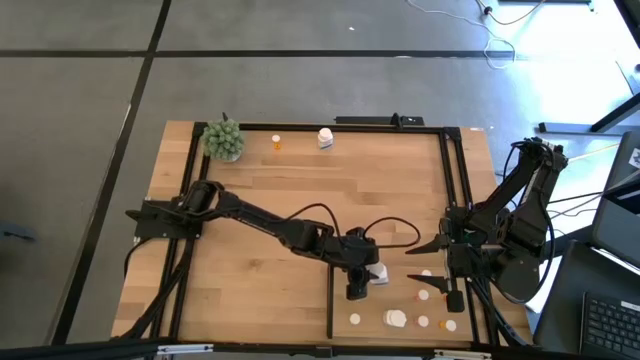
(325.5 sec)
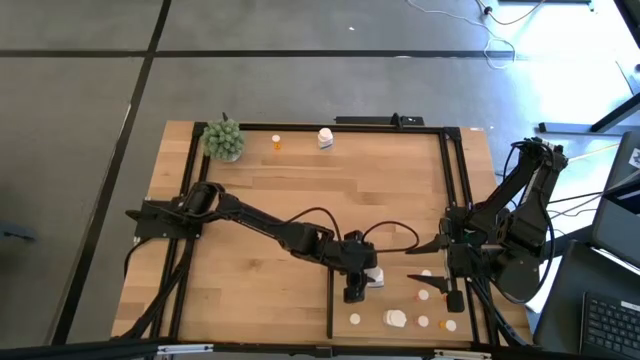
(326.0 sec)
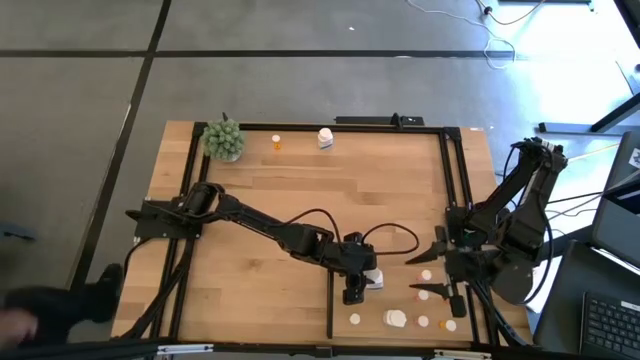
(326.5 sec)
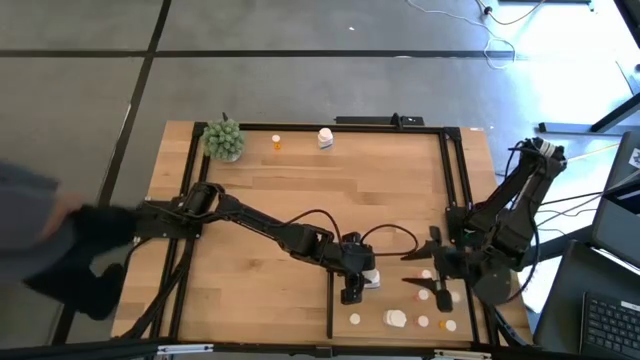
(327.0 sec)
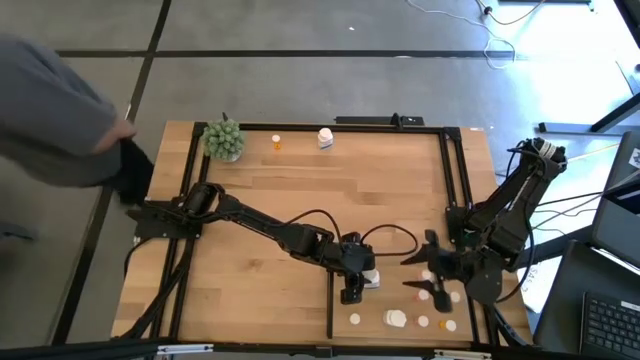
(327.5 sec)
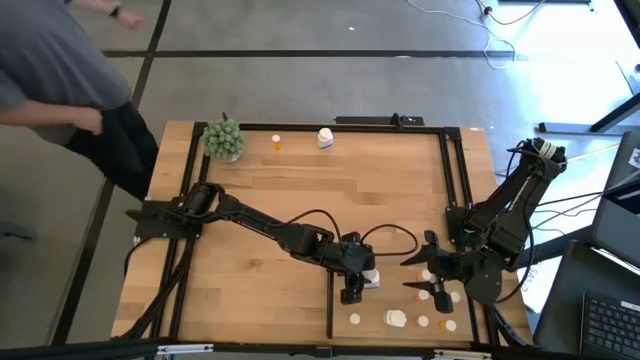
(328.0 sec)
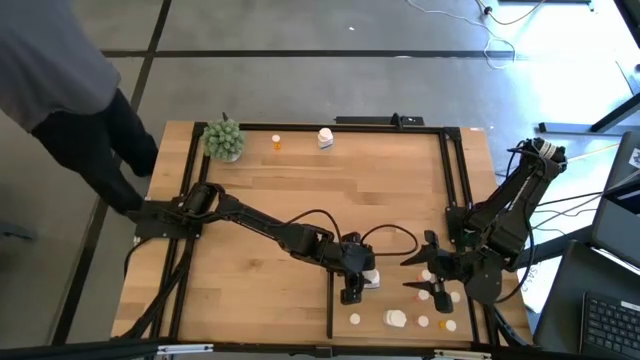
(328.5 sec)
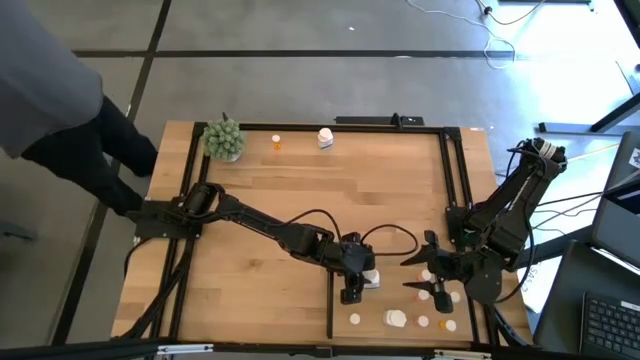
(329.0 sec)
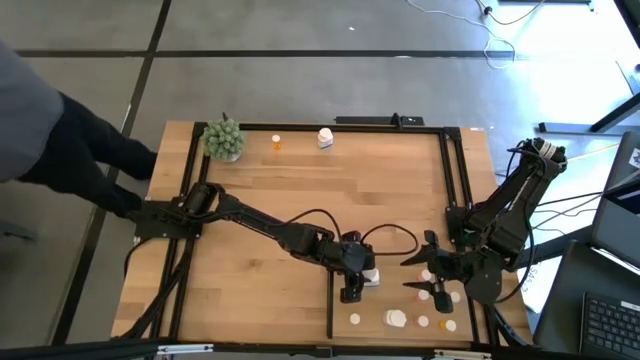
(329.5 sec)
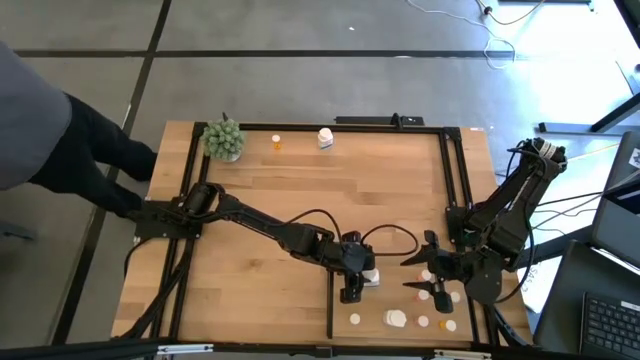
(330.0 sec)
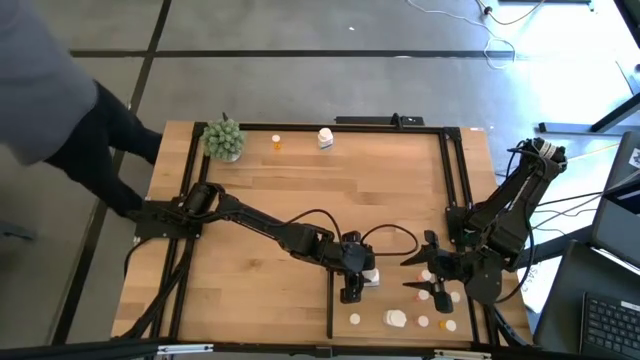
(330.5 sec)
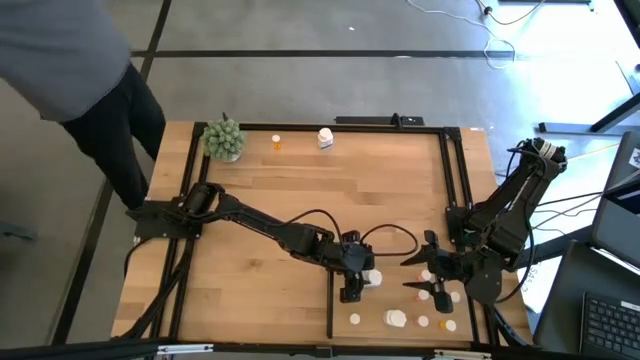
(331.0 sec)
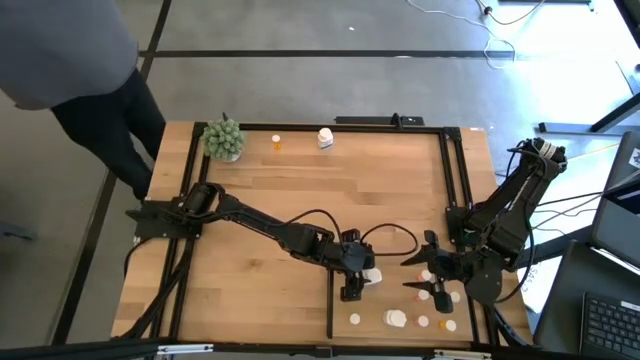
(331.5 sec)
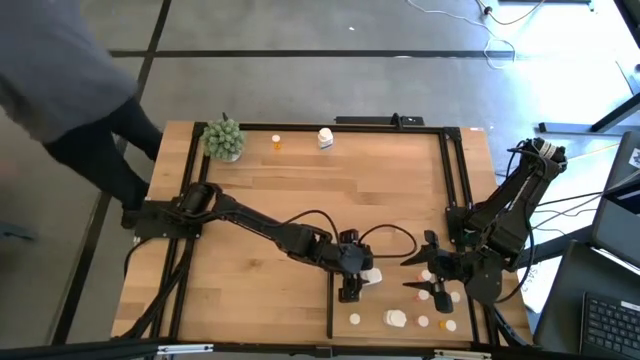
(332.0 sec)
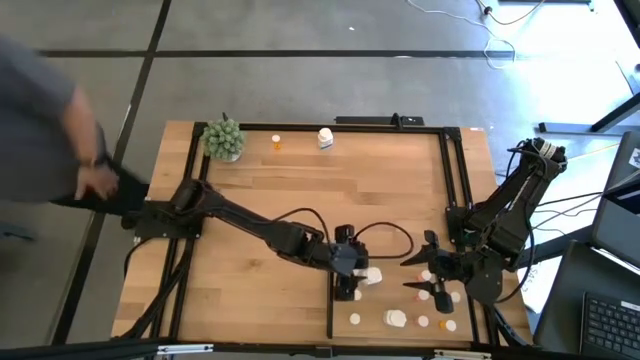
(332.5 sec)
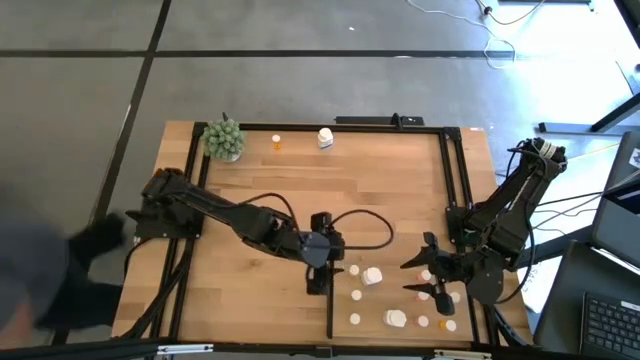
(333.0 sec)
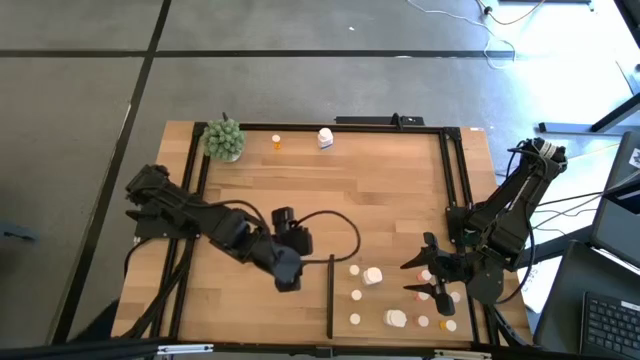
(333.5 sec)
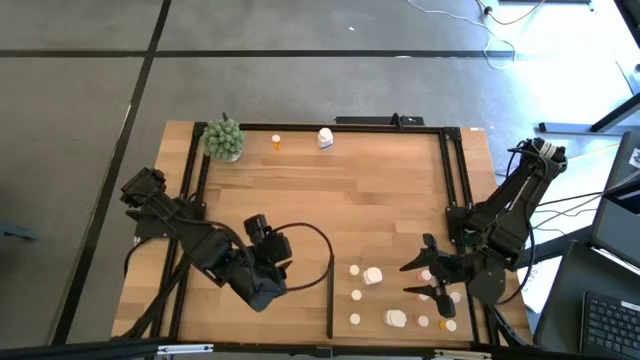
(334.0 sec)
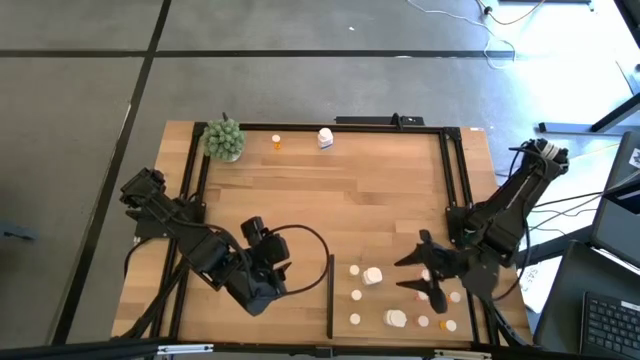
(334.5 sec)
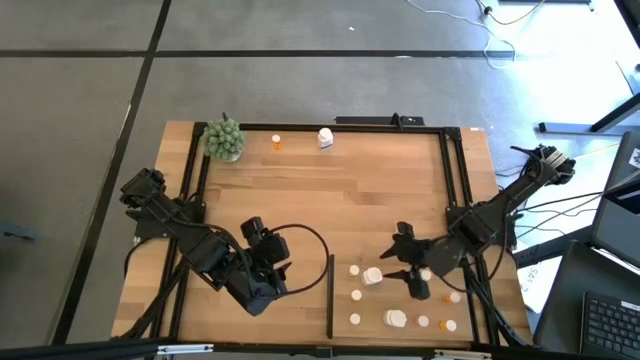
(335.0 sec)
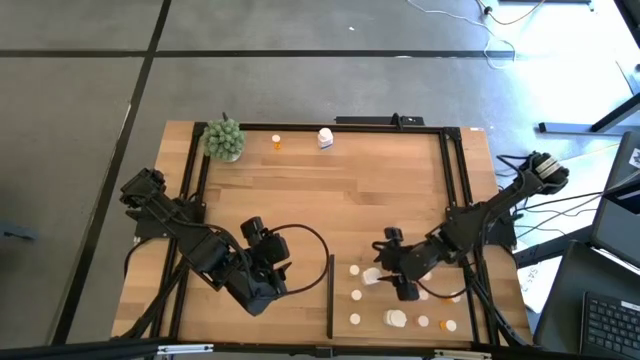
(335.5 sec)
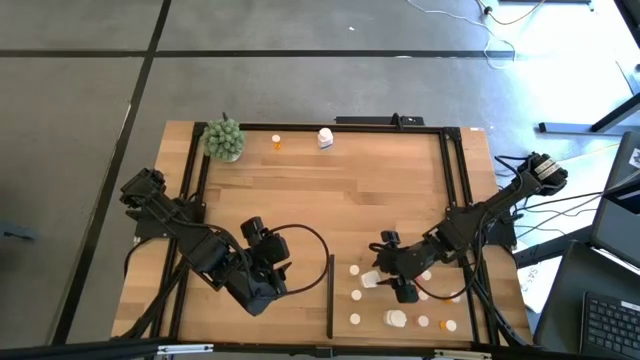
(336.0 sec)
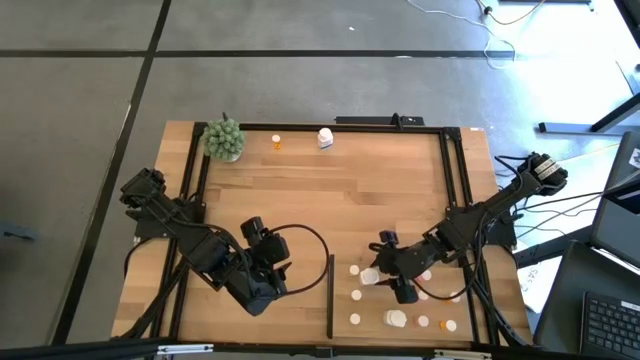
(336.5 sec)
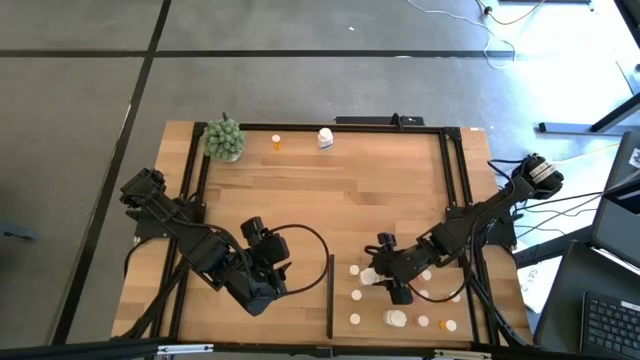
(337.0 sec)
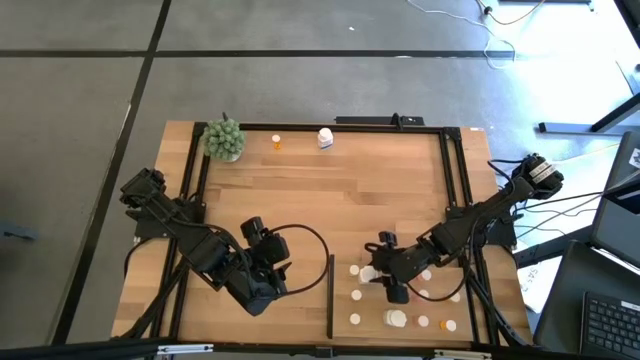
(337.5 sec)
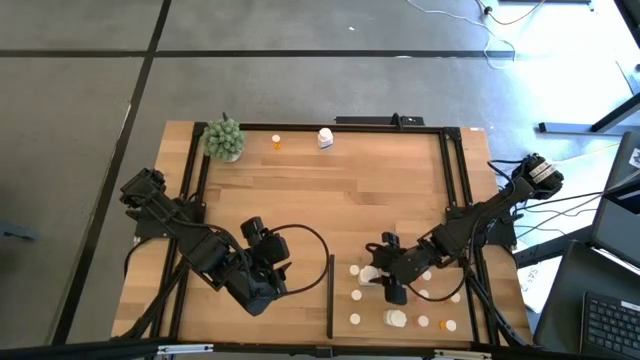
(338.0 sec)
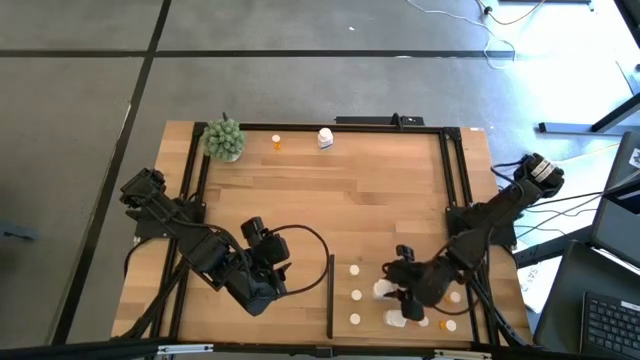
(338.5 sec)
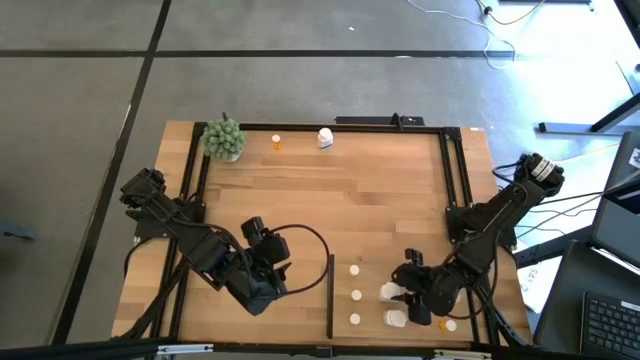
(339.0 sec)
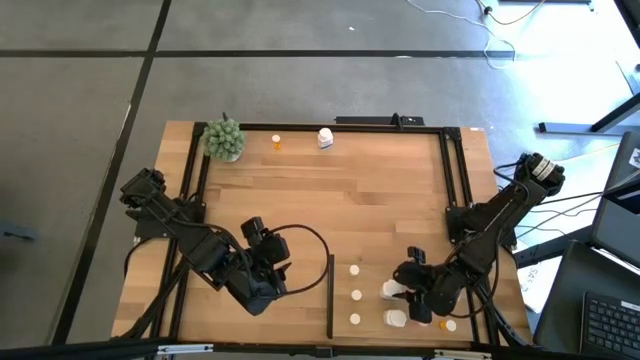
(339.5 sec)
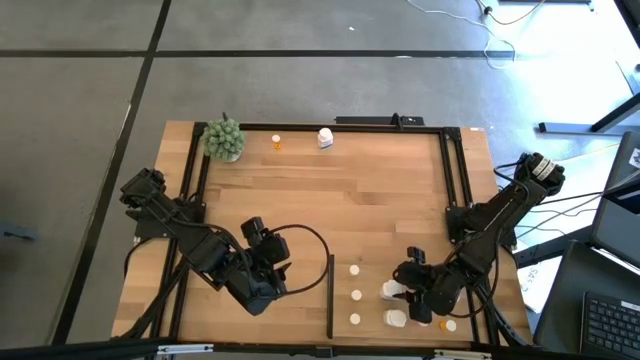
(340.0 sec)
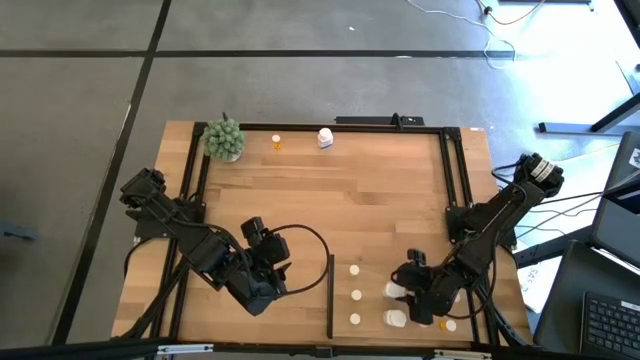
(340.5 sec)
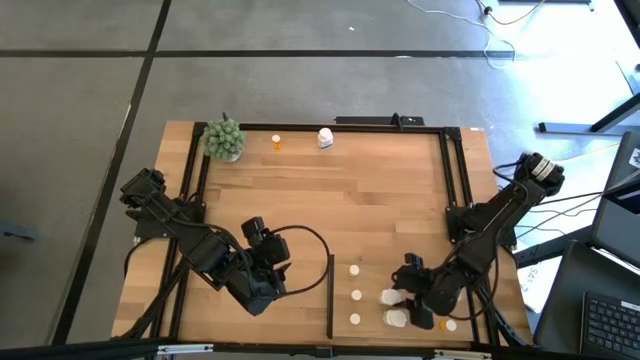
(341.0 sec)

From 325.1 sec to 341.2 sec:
Task: Pick and place medicine bottles onto shelf by color
Put the bottom supplement bottle on the shelf aligned with the other supplement bottle

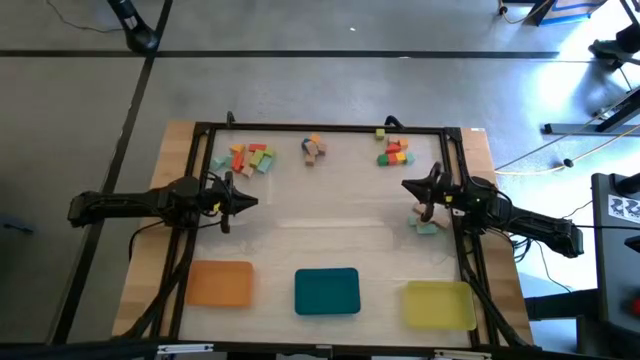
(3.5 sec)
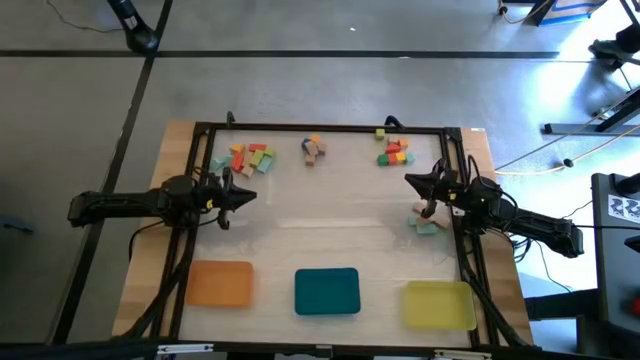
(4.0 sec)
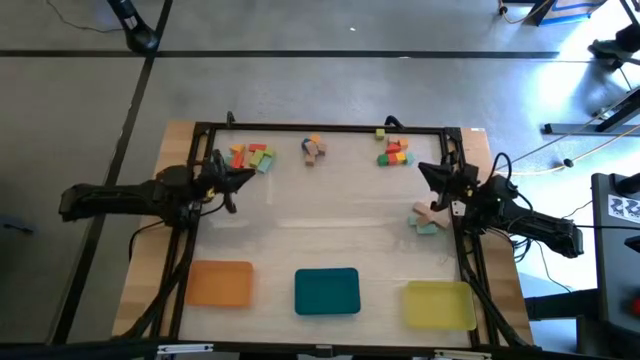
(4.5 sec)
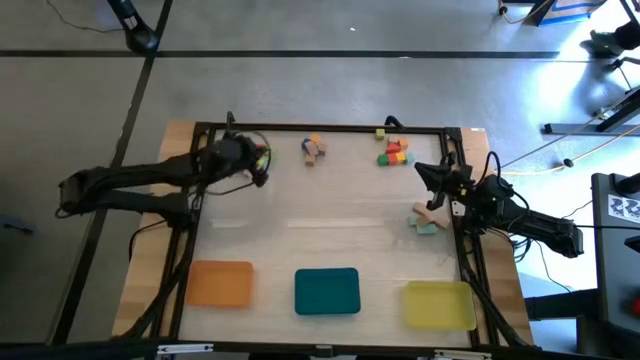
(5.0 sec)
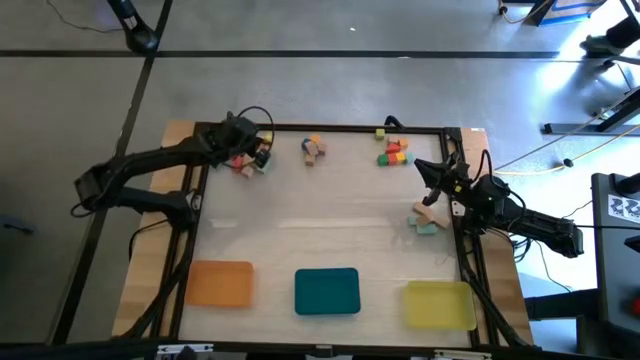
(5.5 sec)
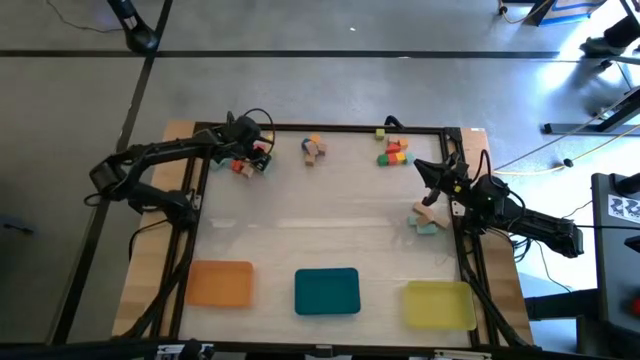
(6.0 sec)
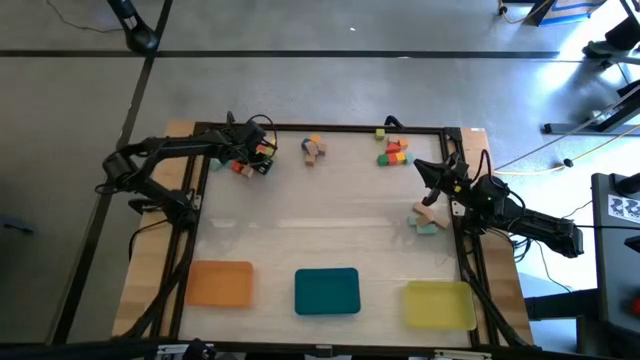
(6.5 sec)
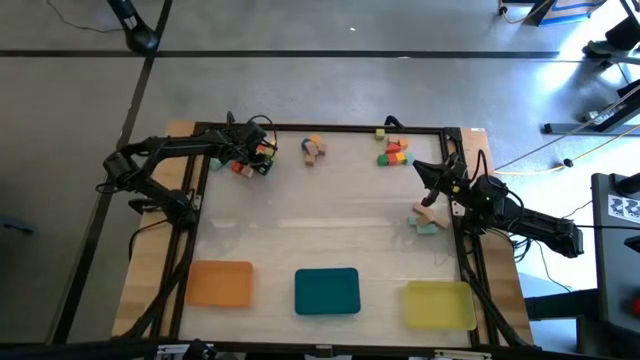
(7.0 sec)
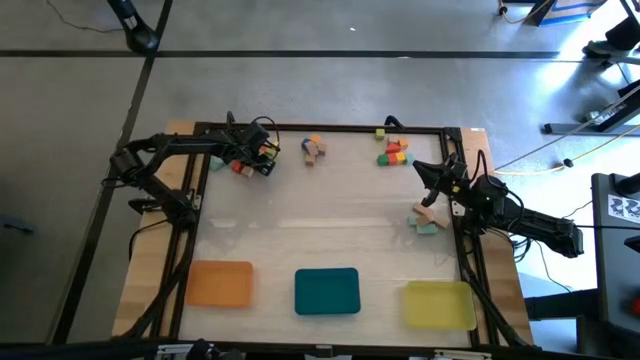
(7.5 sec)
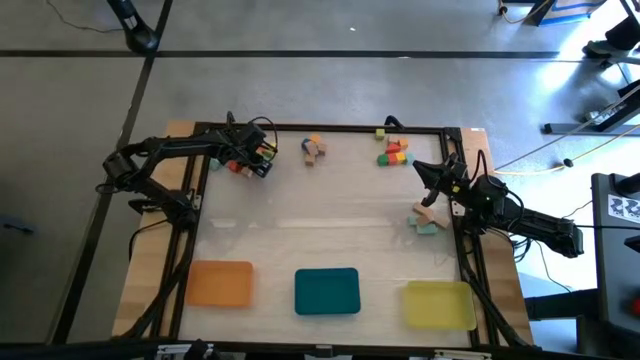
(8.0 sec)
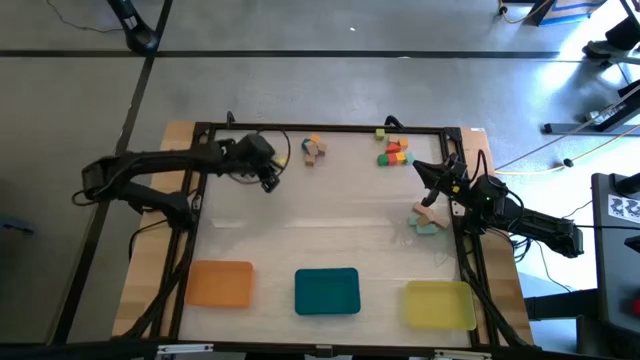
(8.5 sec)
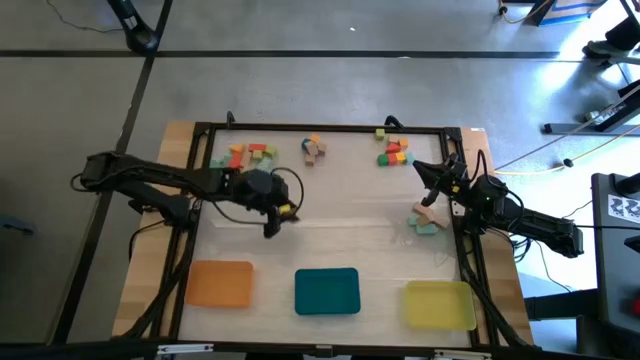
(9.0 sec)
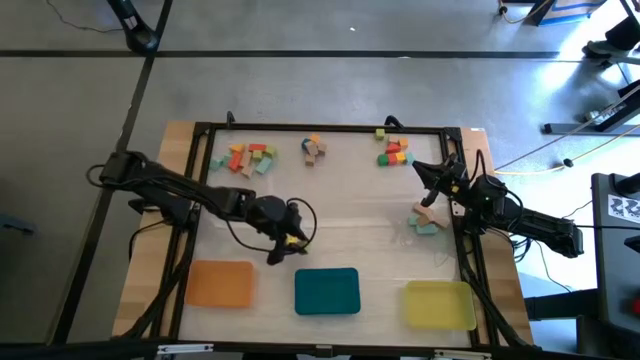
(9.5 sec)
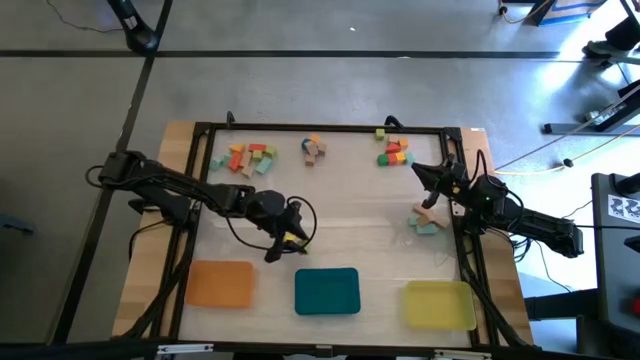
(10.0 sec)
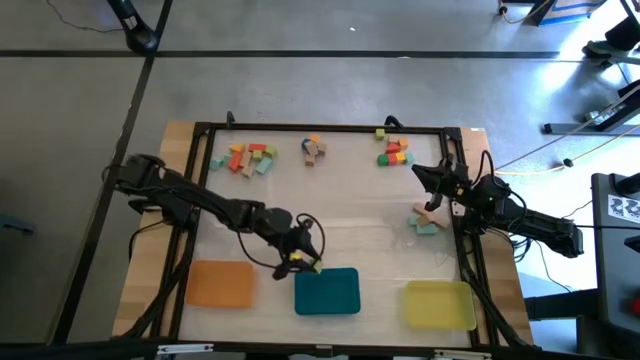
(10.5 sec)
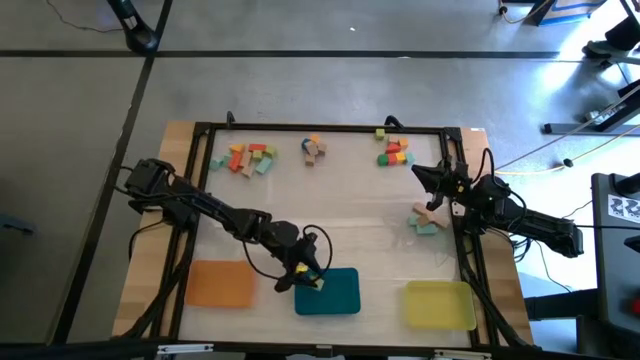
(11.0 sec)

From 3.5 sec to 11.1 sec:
Task: Sort blocks by size
Put the light green cube block into the blue bin
